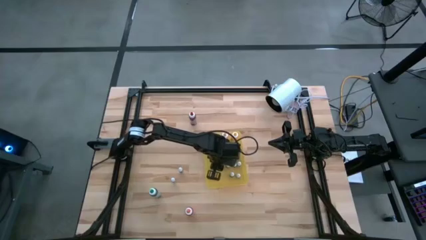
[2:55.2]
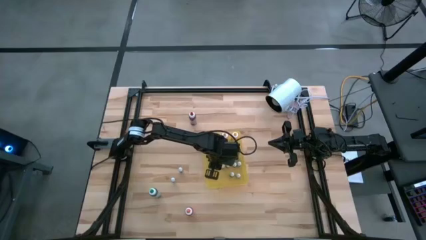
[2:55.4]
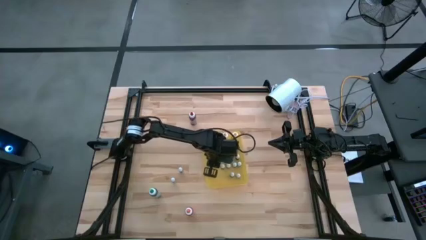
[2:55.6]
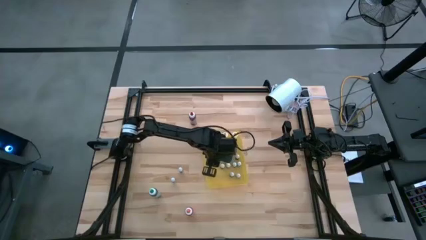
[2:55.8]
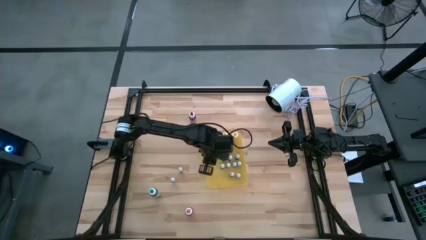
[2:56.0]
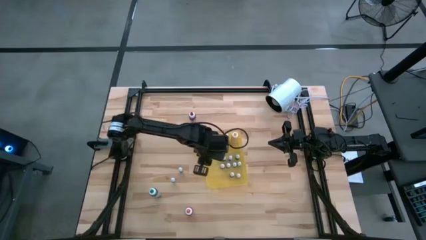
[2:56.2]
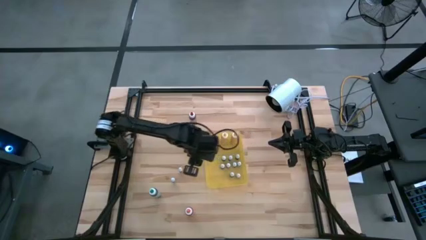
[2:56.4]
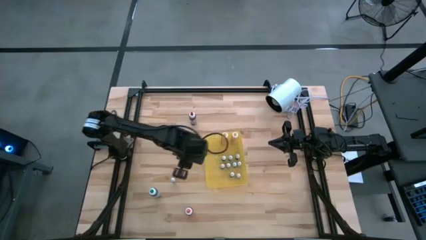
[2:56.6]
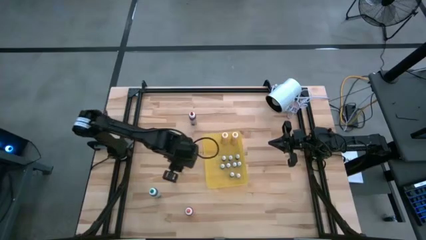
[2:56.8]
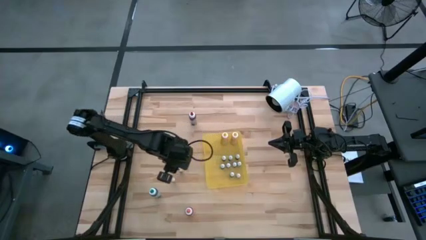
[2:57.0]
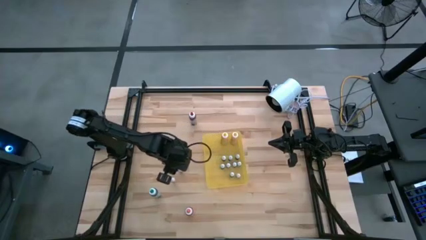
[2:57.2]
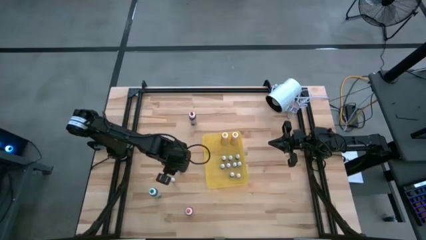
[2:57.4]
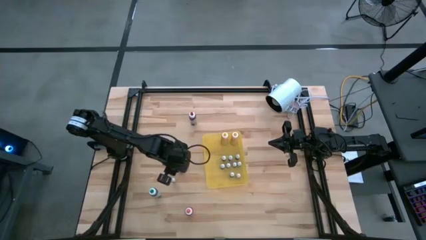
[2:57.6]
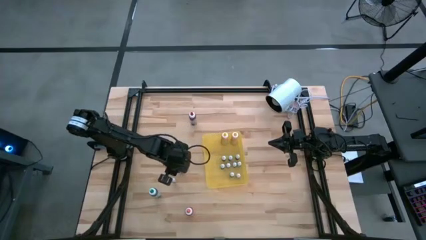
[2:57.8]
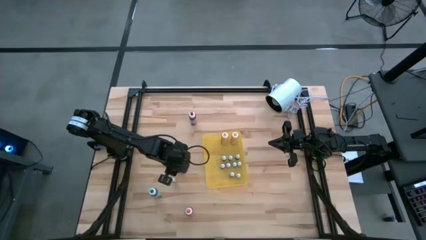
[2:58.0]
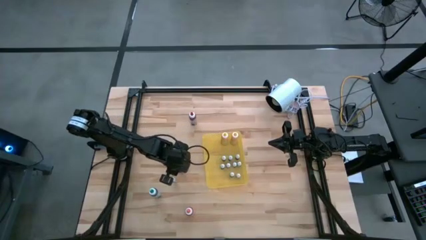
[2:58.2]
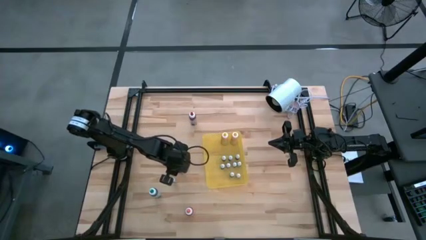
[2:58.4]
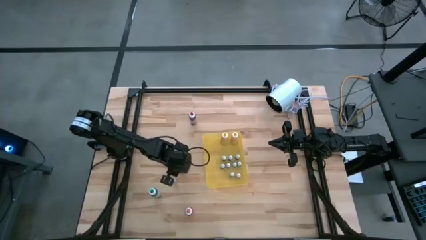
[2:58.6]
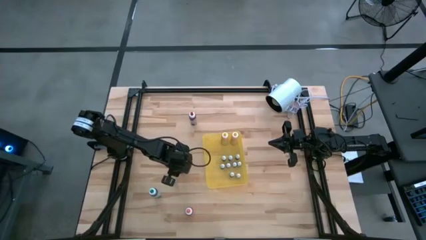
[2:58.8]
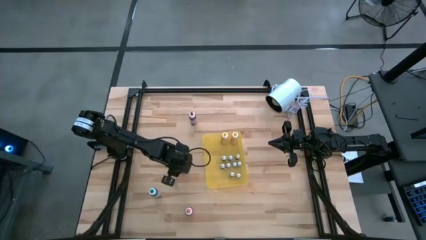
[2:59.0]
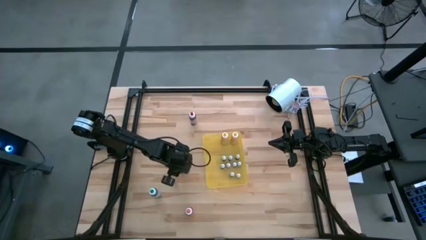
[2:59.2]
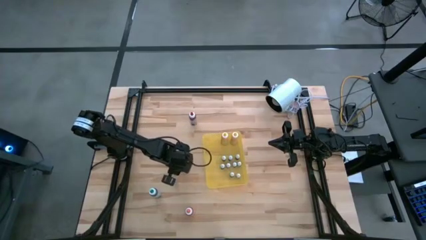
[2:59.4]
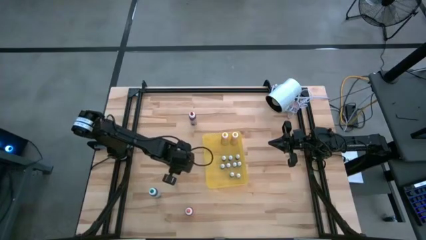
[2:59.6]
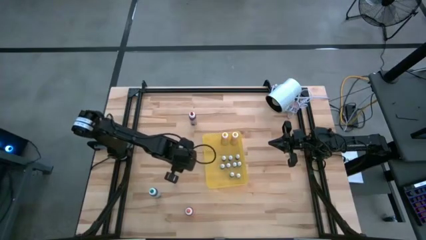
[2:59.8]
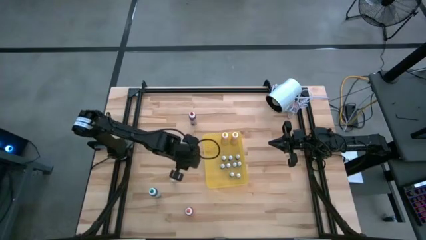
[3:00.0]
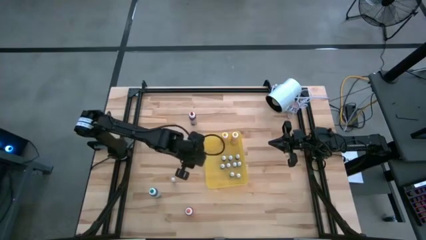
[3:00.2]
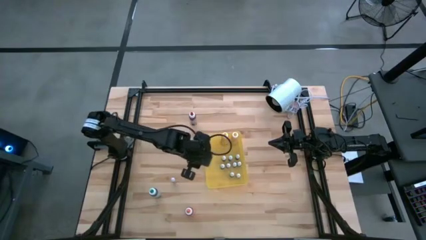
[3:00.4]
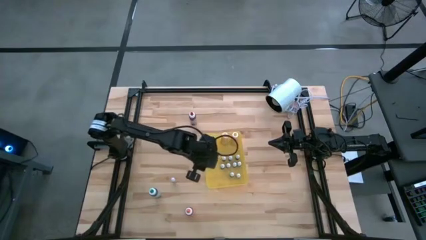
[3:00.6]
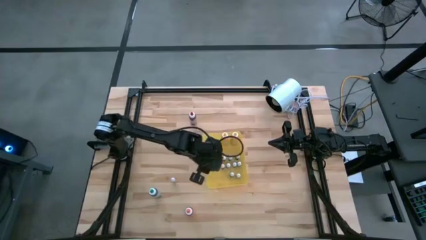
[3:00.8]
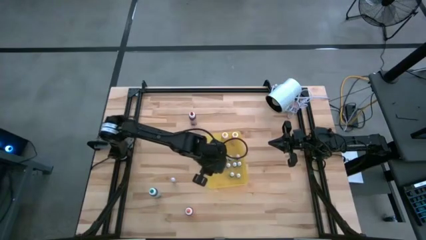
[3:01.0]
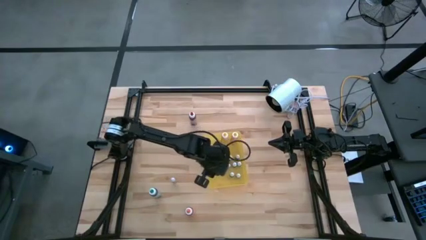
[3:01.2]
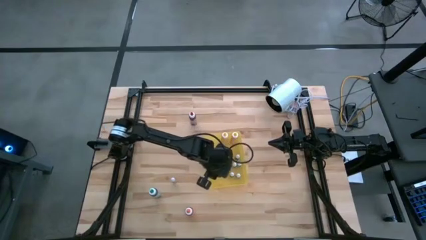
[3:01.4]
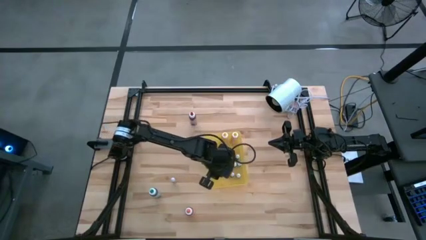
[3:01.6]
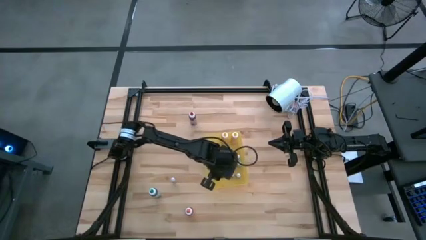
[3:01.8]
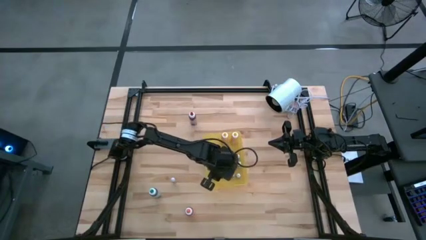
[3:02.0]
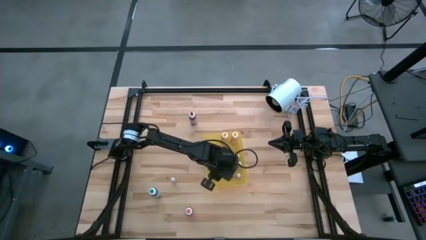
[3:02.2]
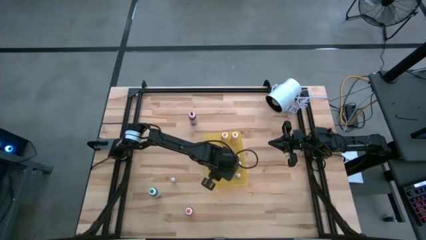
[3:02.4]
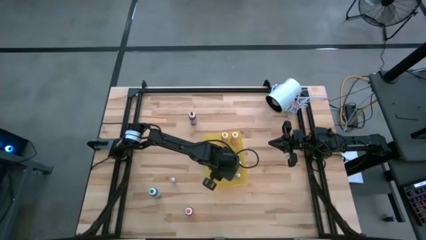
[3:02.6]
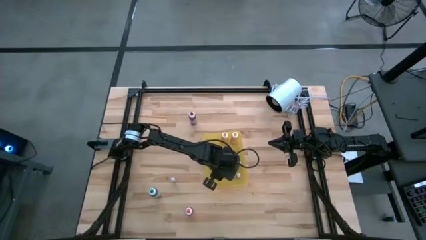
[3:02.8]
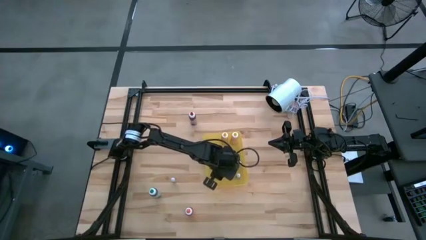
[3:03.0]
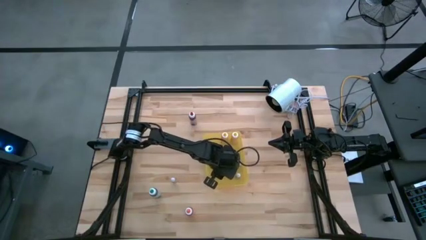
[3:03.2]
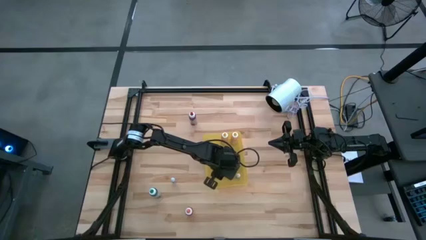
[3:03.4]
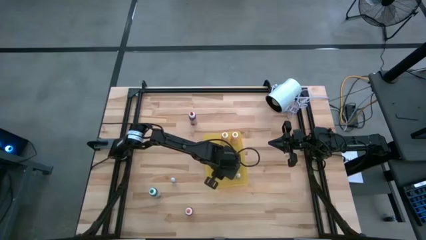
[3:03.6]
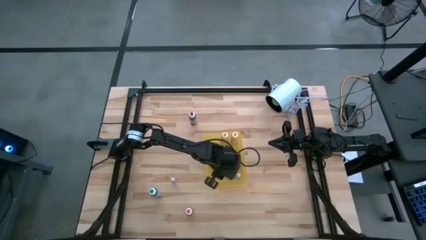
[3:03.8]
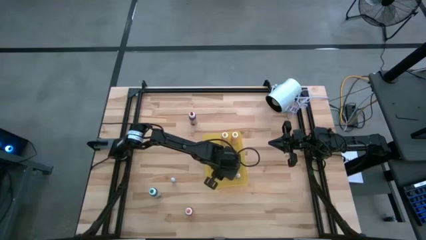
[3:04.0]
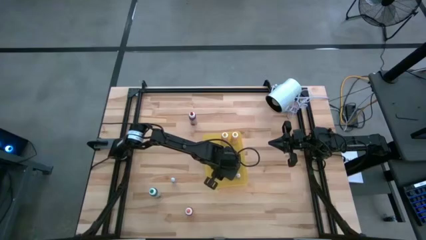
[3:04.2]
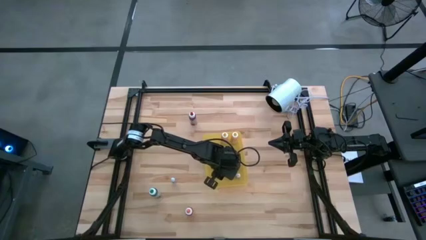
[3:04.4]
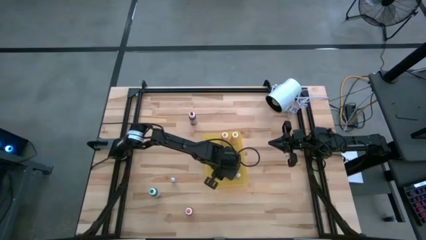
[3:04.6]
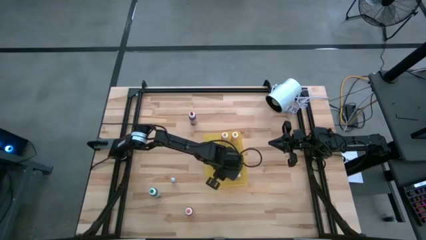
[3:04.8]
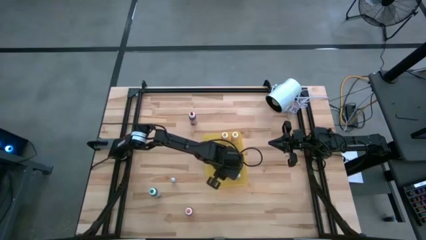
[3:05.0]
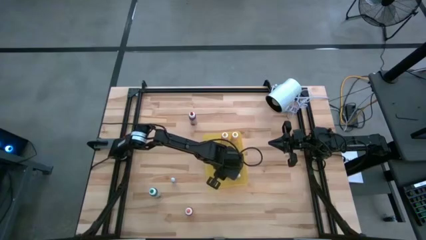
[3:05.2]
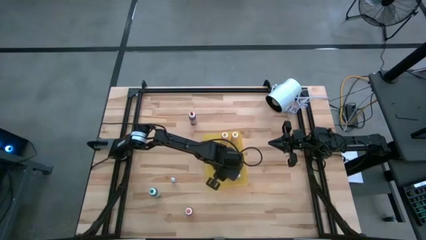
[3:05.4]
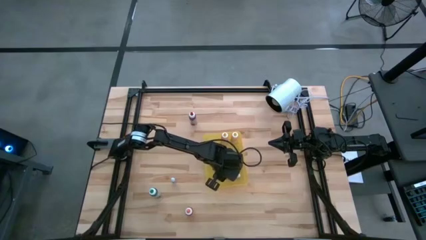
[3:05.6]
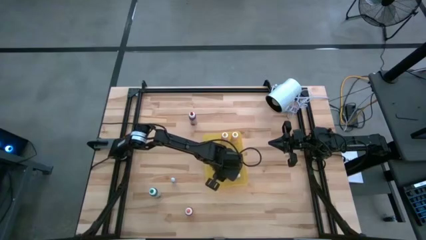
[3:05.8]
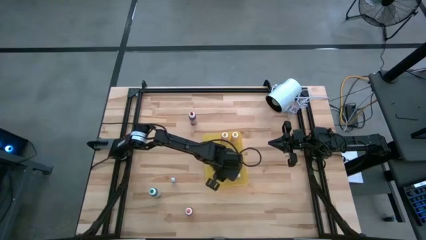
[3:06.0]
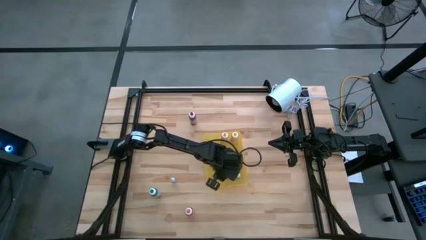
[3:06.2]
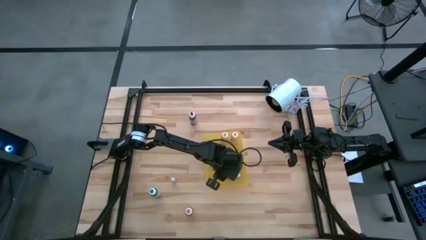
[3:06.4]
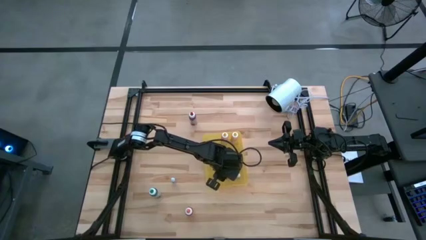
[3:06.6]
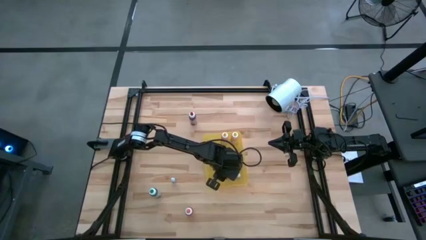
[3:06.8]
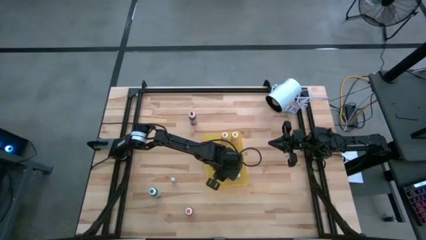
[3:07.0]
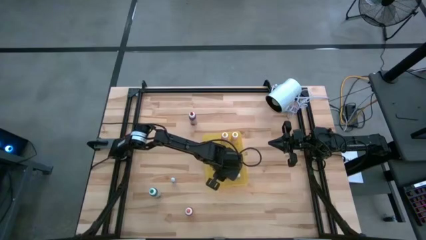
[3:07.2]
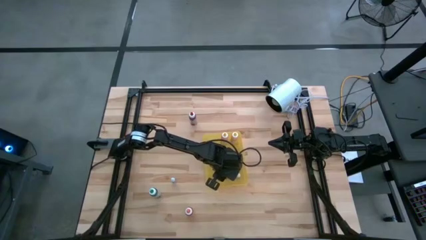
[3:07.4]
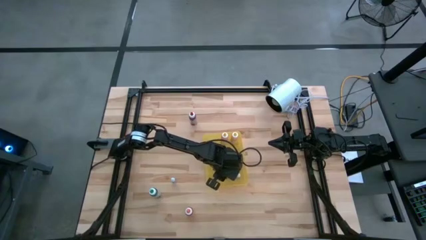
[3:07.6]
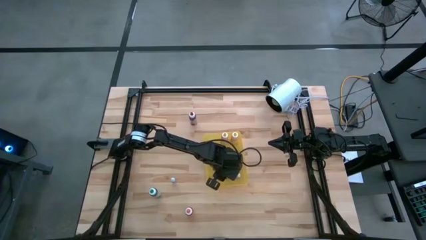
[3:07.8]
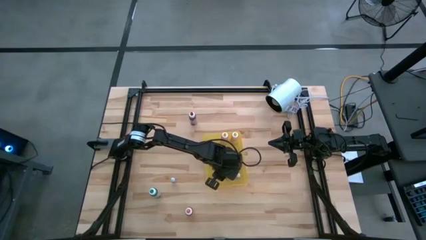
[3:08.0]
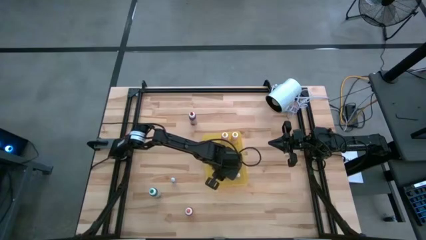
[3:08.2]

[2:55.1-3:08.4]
Task: Pick & Place food coloring
Put the small violet food coloring bottle into the yellow bin
